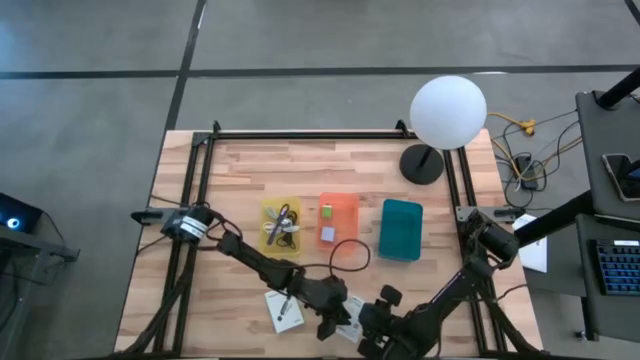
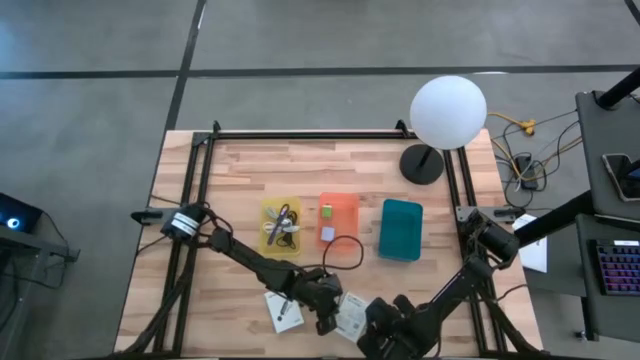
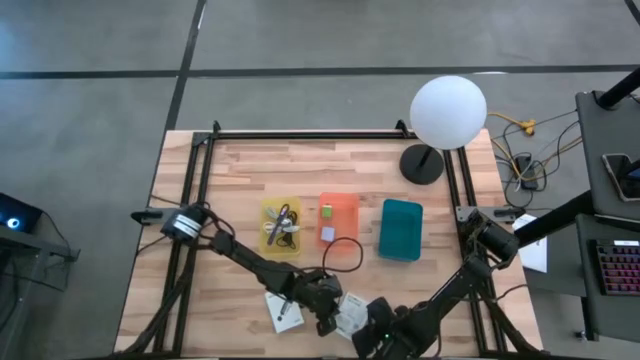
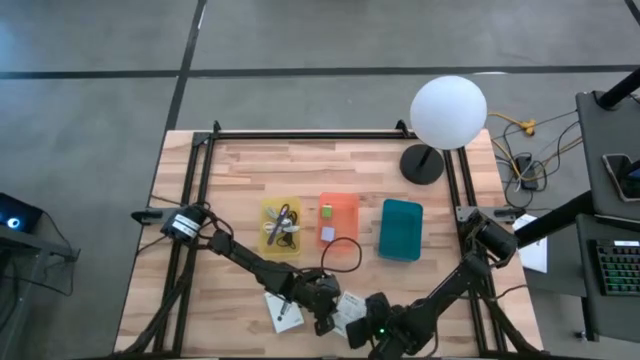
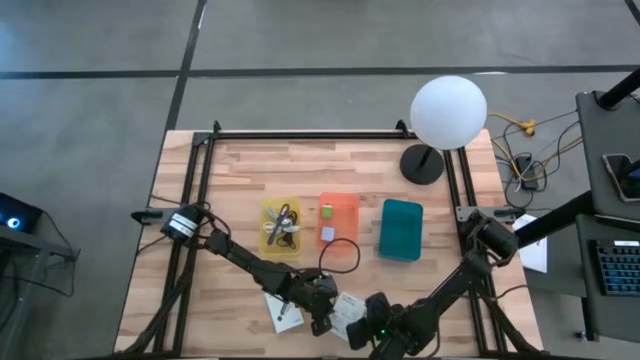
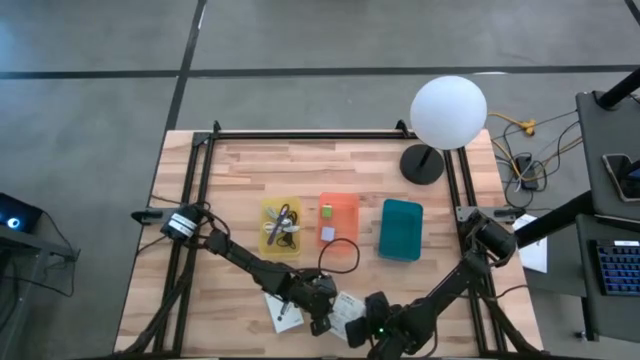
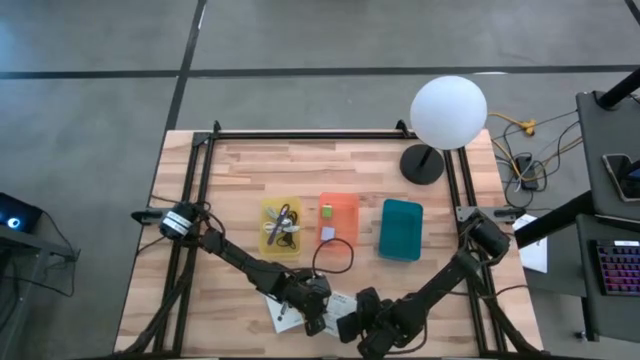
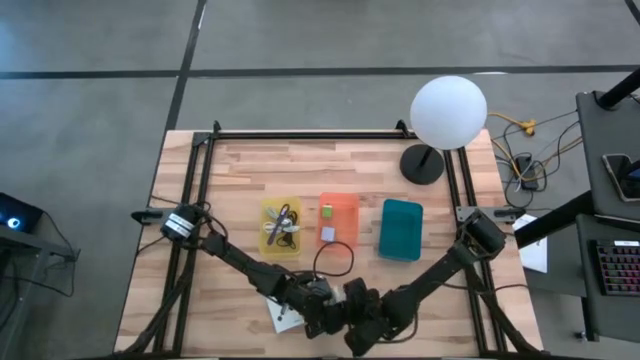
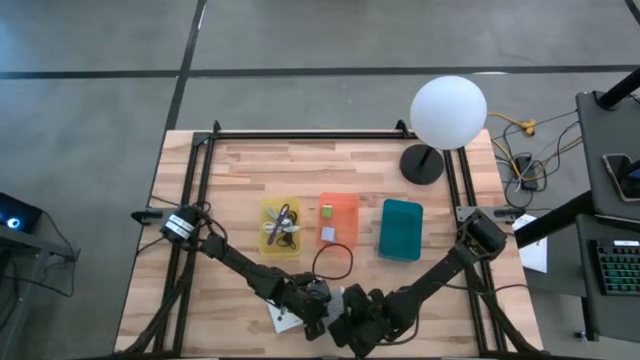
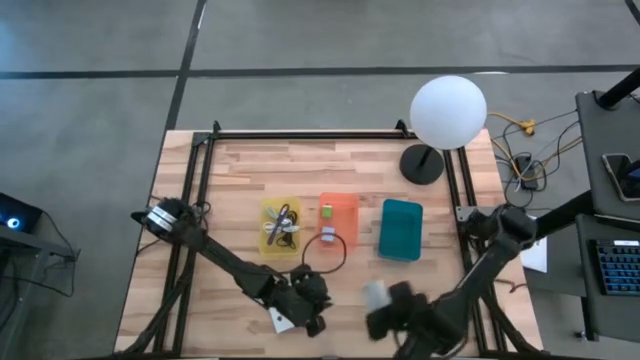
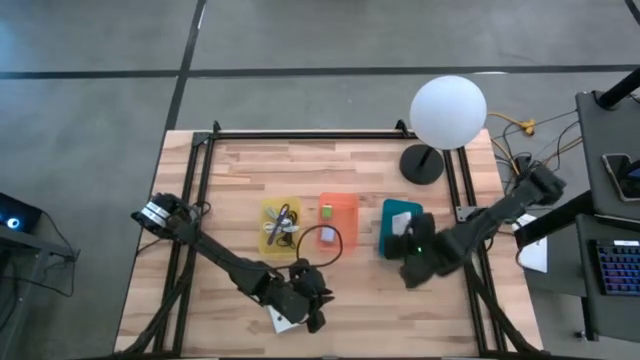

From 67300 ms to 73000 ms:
Task: Pick and place items into bin
Put the right white card reader box into the blue bin

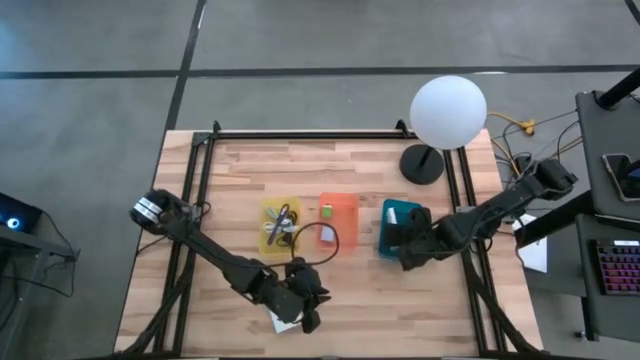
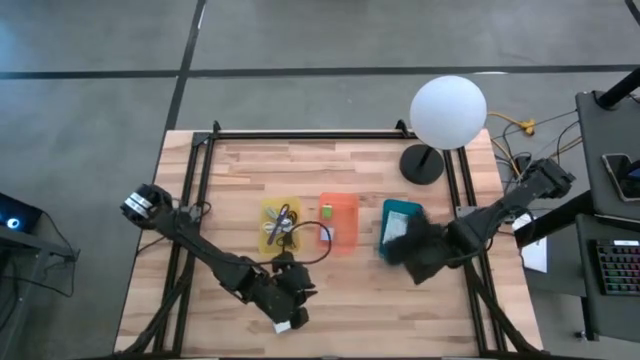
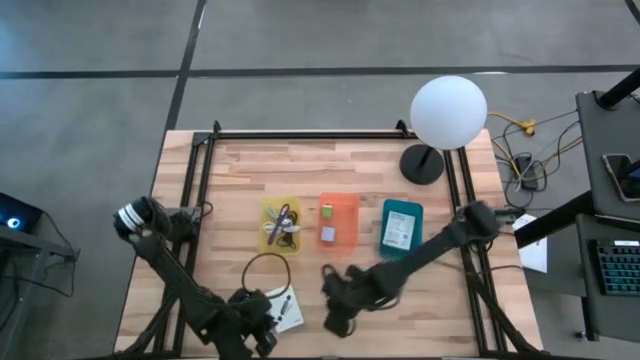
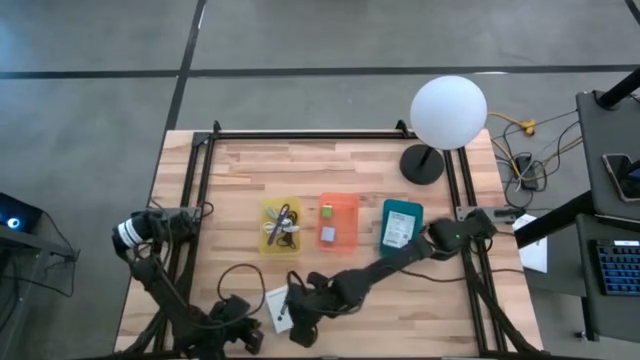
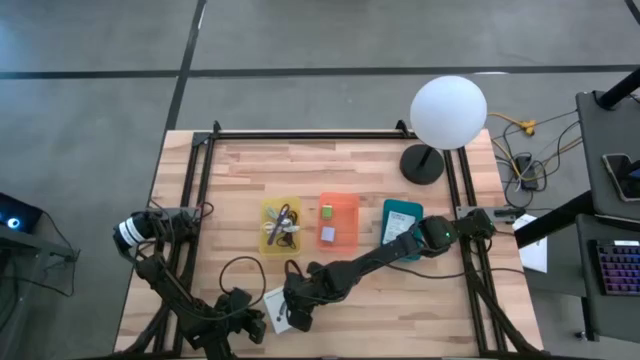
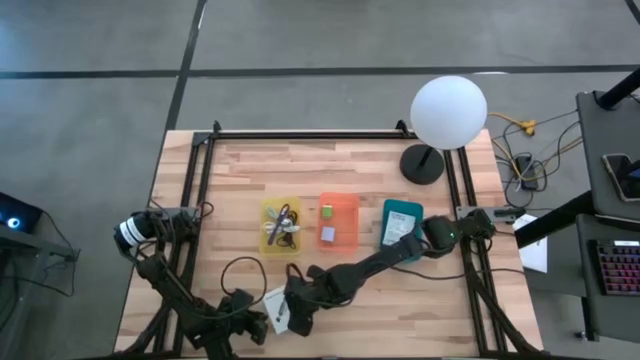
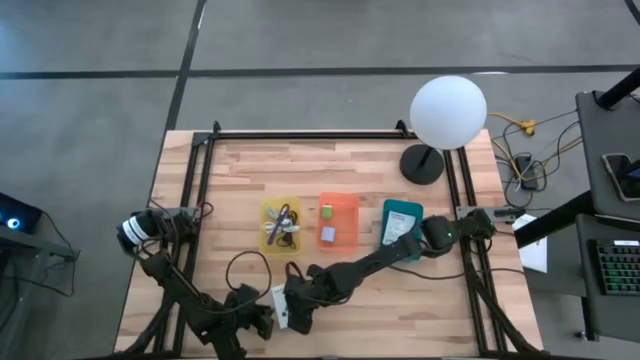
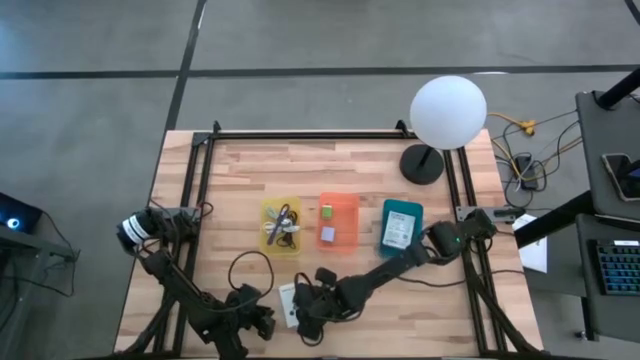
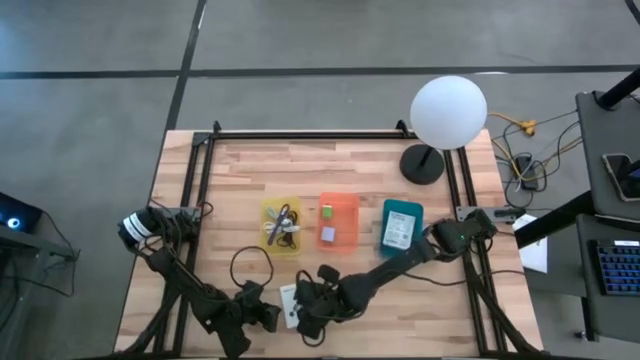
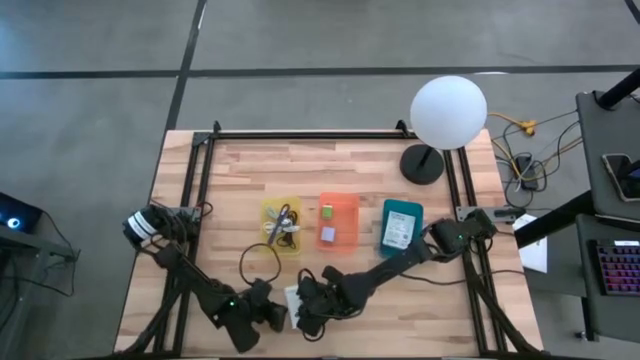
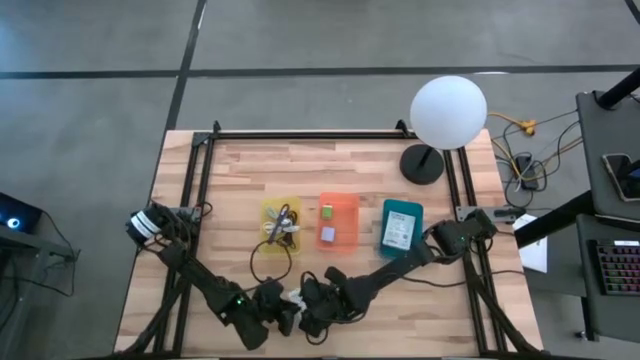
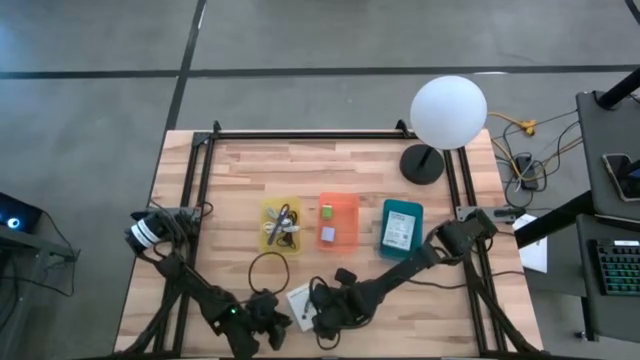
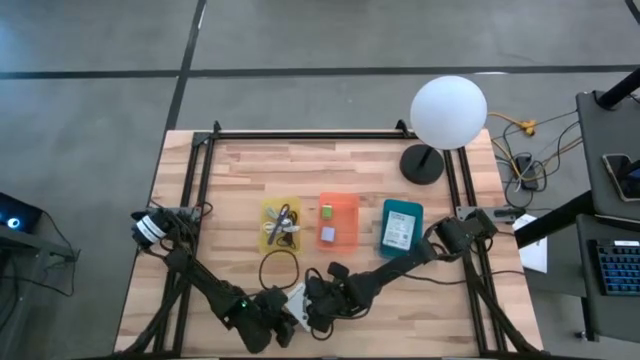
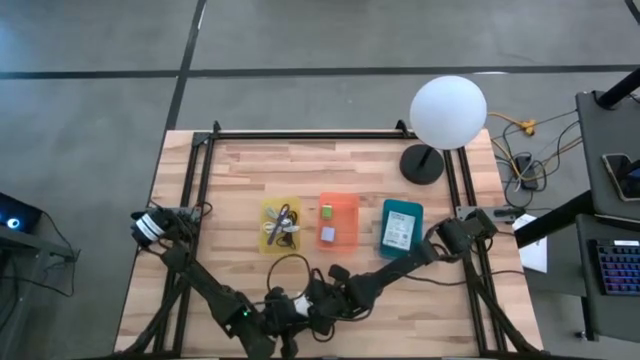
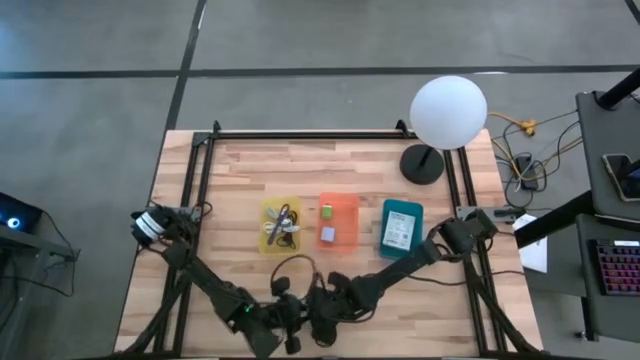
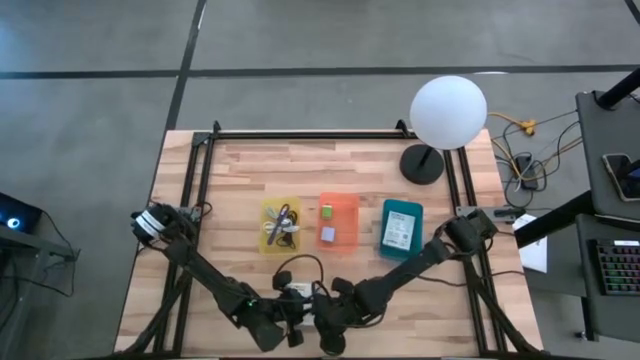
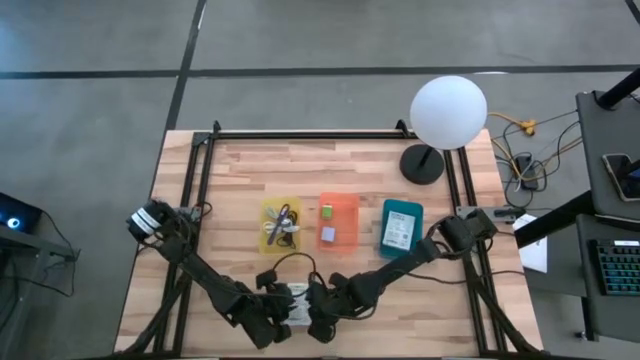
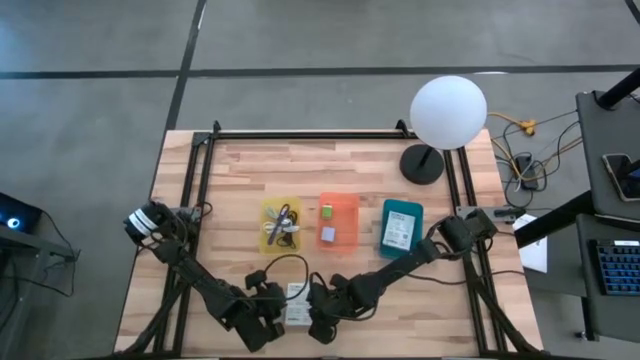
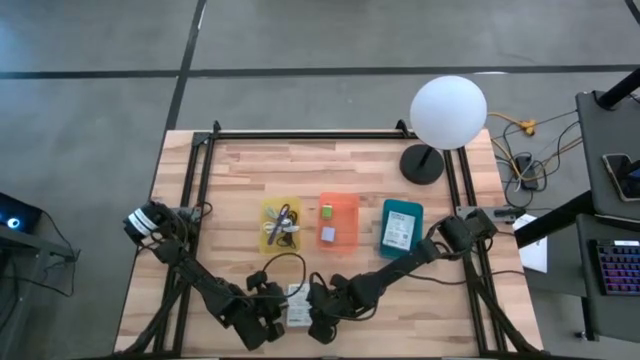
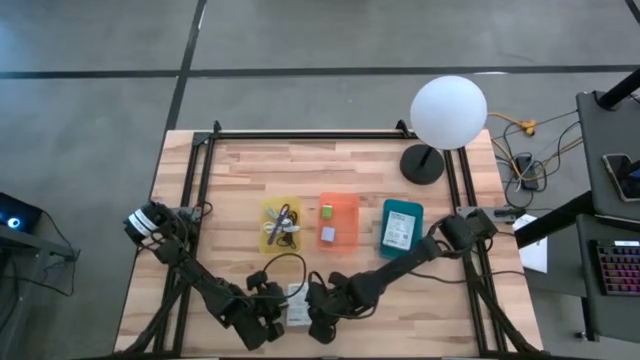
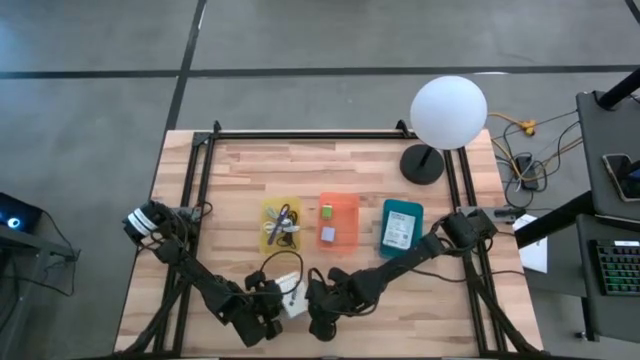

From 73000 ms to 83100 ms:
Put the white card reader box into the blue bin

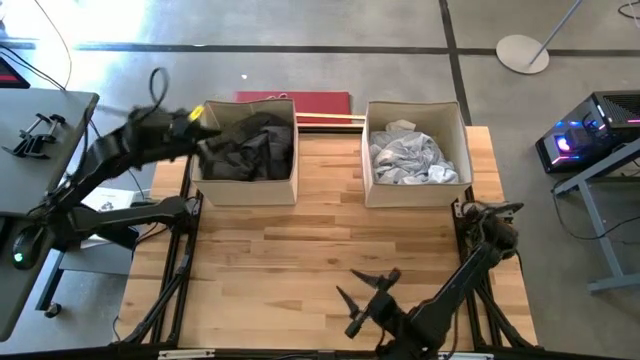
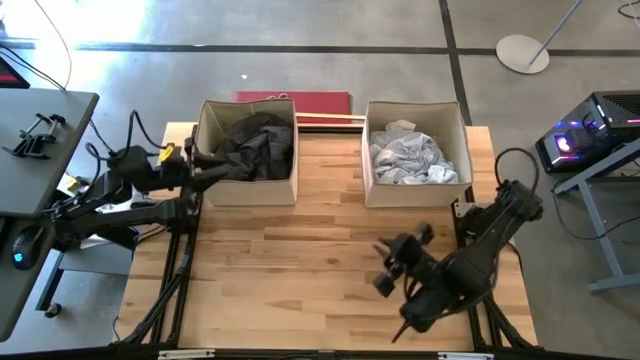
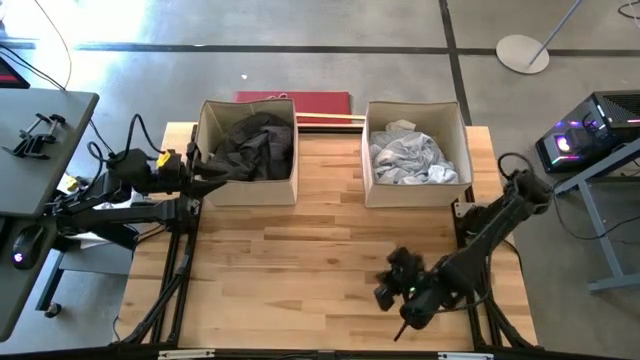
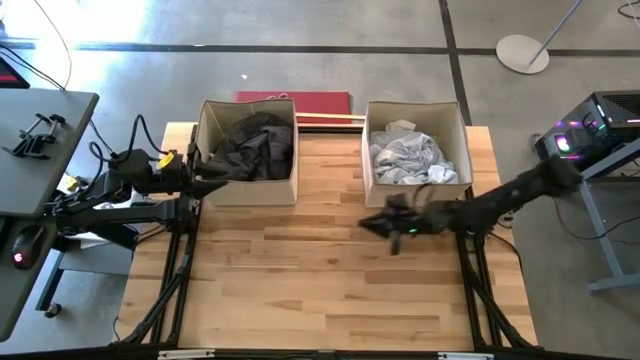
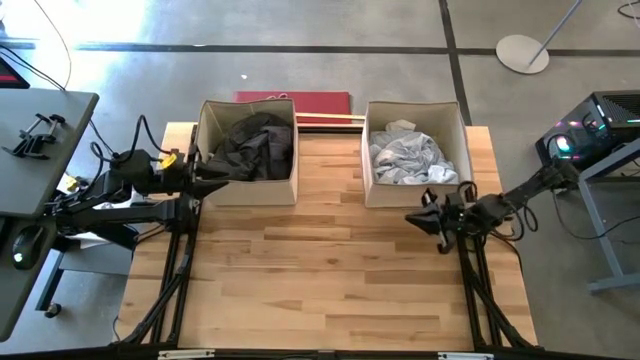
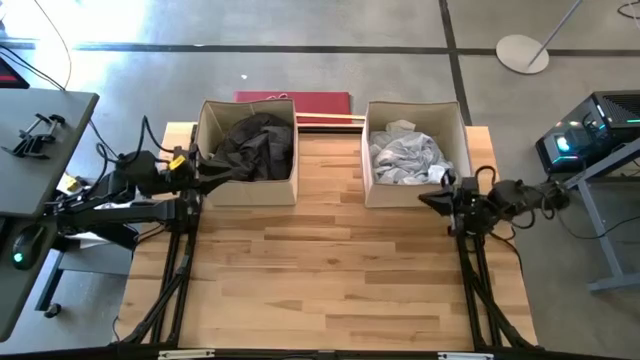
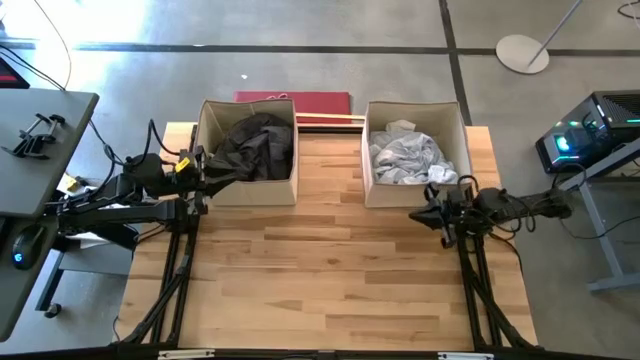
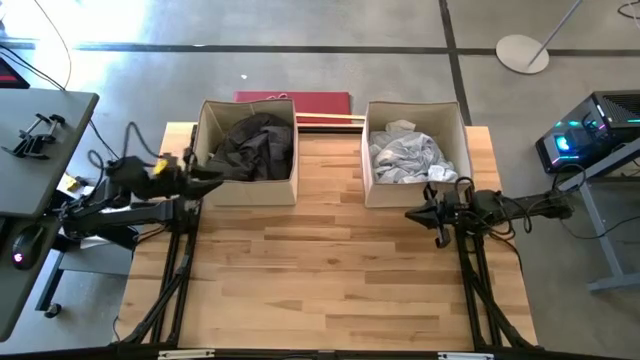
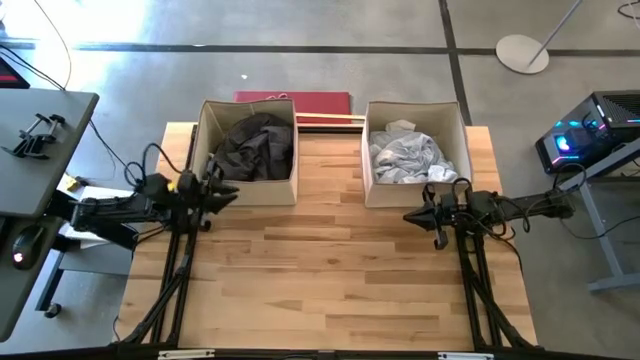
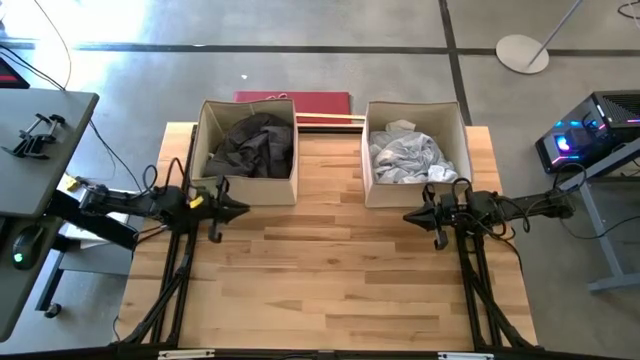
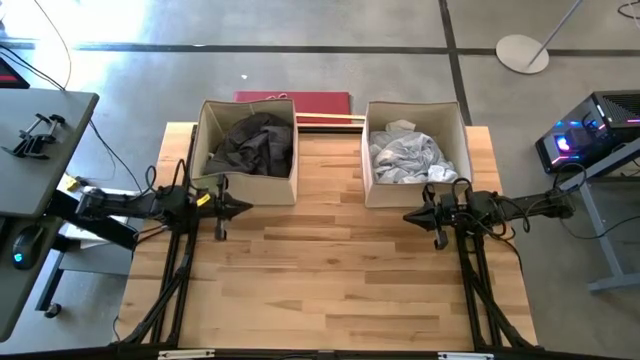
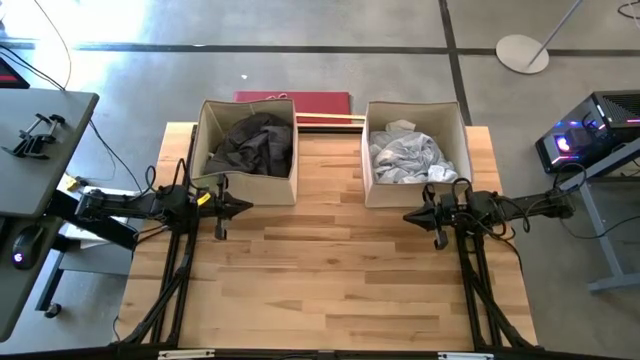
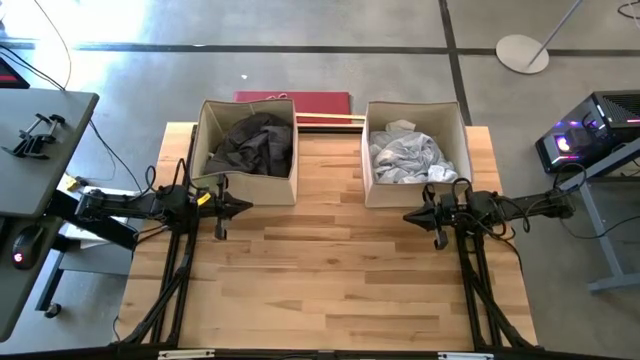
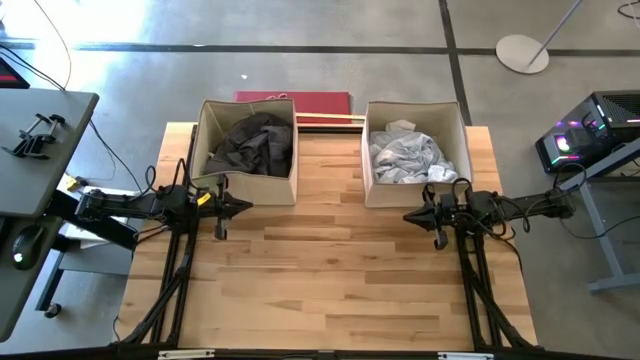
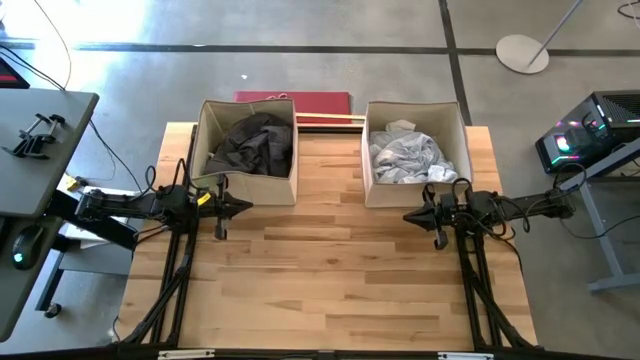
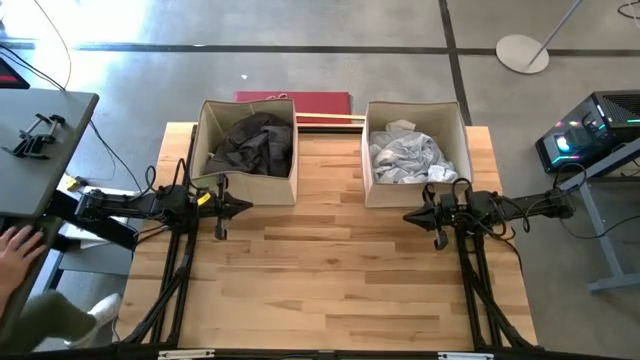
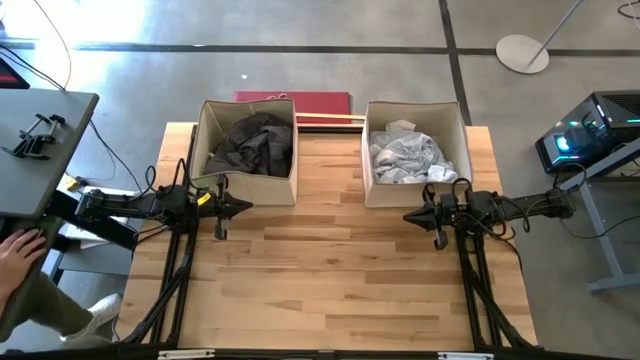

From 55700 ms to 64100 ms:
Task: Sort clothes
Return to Home Position
